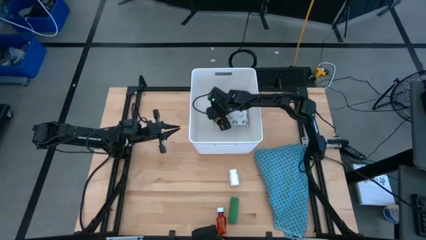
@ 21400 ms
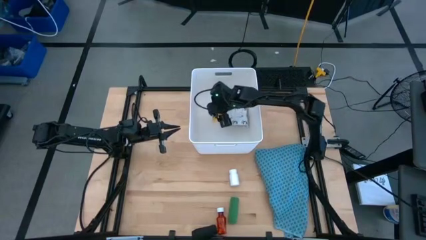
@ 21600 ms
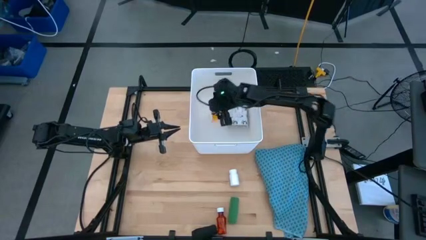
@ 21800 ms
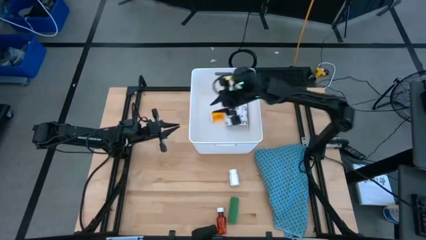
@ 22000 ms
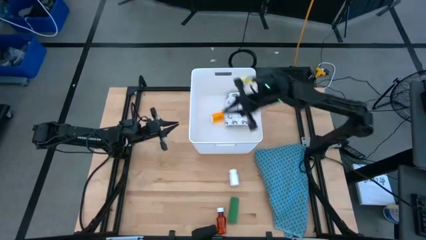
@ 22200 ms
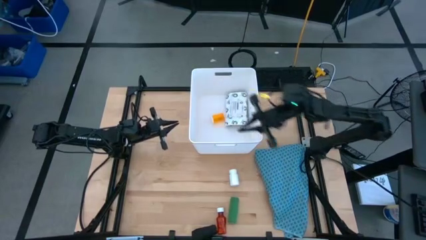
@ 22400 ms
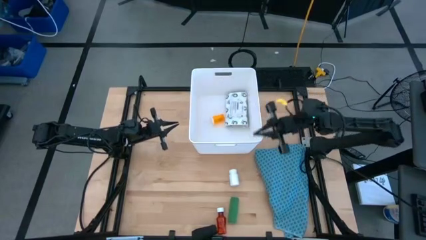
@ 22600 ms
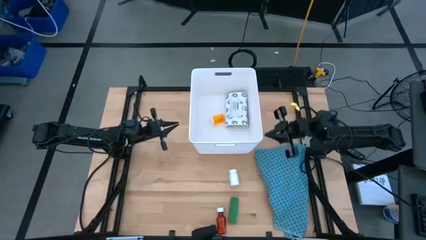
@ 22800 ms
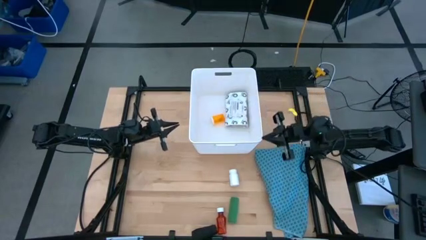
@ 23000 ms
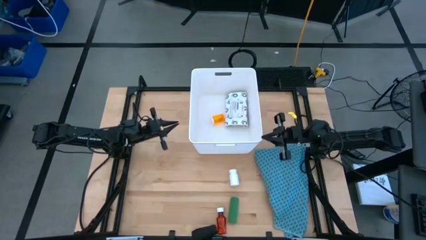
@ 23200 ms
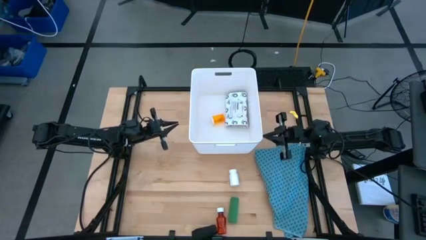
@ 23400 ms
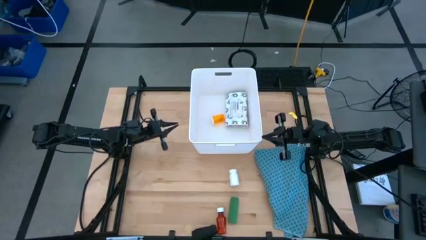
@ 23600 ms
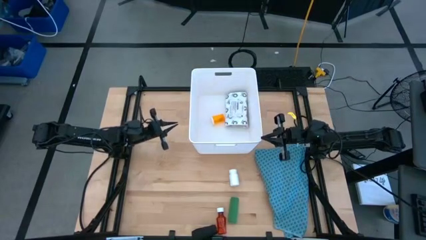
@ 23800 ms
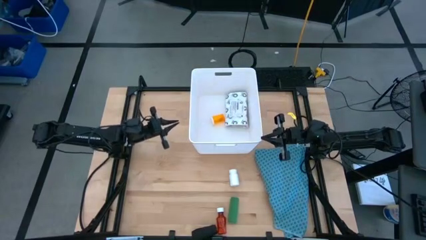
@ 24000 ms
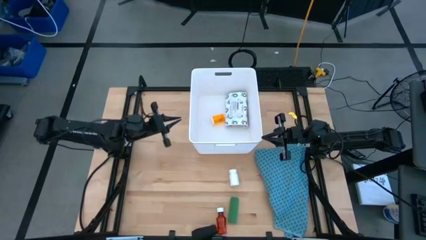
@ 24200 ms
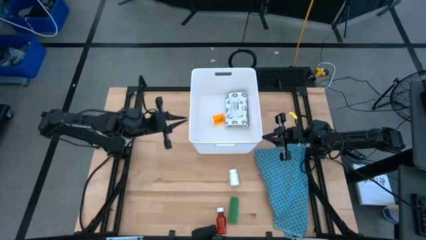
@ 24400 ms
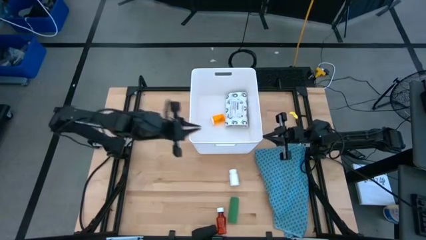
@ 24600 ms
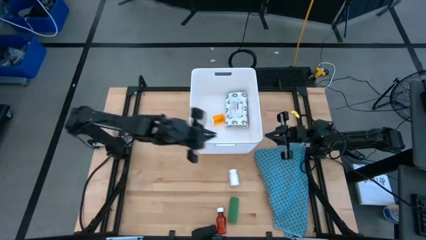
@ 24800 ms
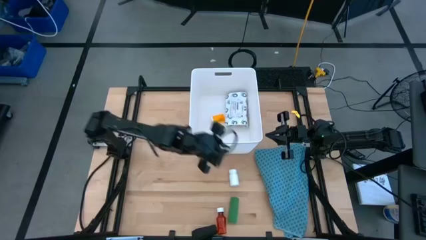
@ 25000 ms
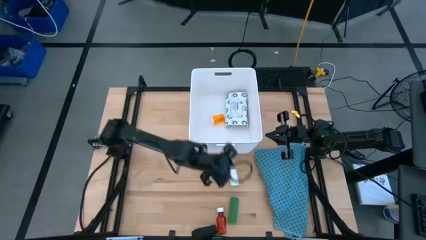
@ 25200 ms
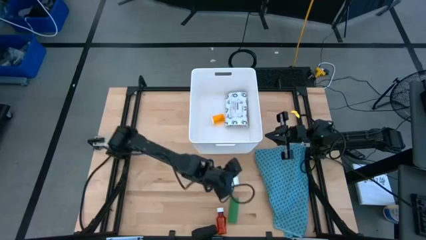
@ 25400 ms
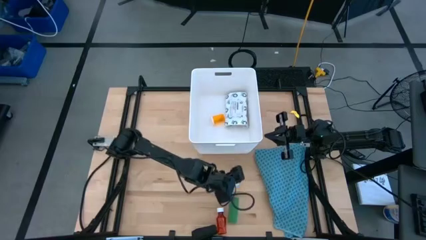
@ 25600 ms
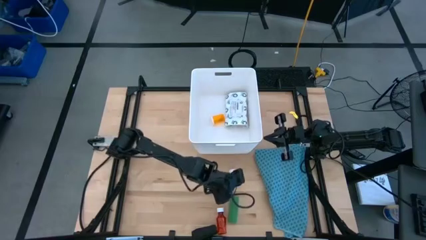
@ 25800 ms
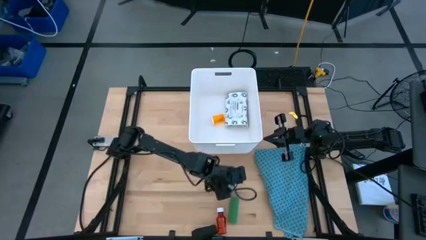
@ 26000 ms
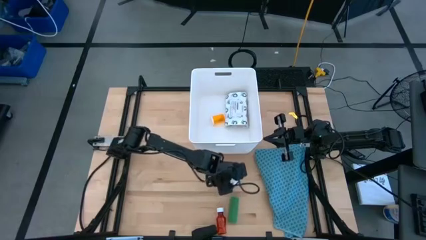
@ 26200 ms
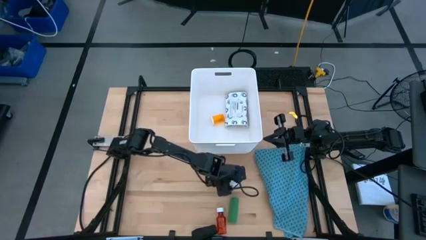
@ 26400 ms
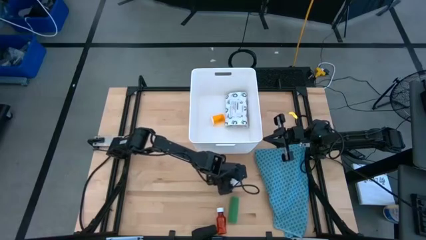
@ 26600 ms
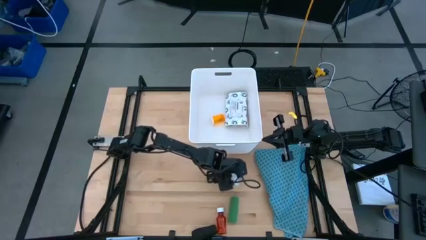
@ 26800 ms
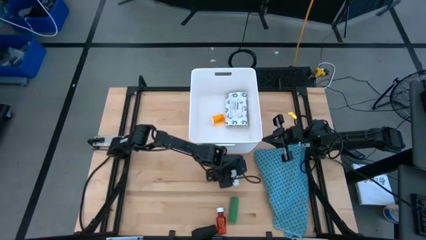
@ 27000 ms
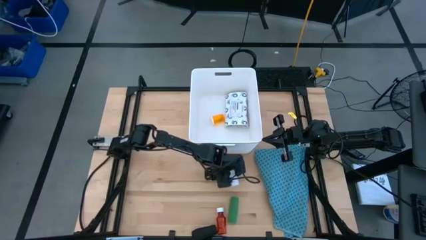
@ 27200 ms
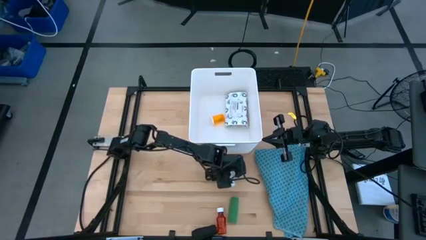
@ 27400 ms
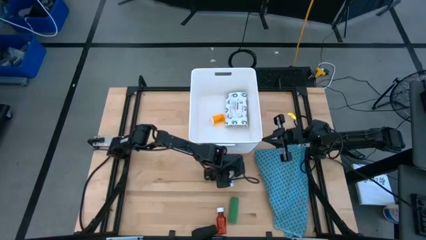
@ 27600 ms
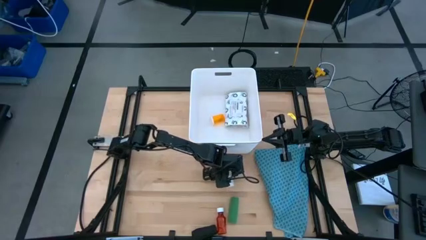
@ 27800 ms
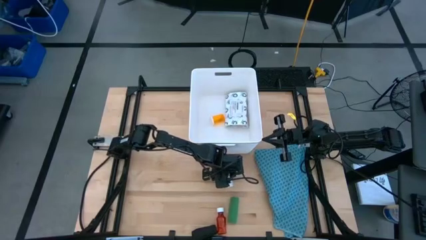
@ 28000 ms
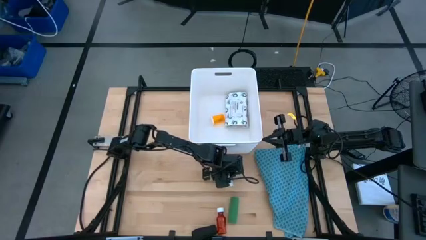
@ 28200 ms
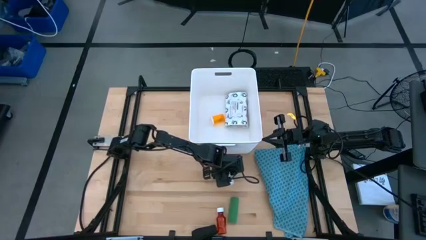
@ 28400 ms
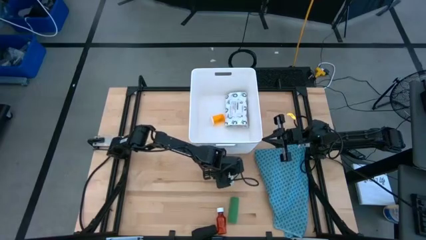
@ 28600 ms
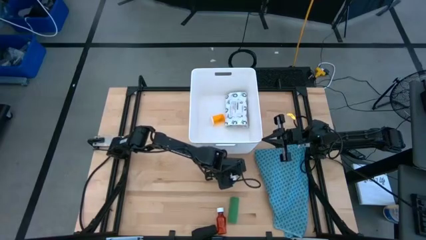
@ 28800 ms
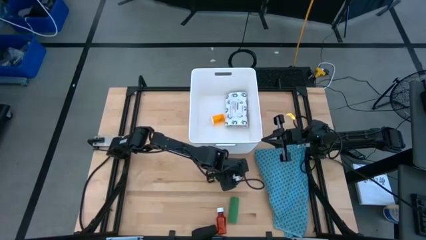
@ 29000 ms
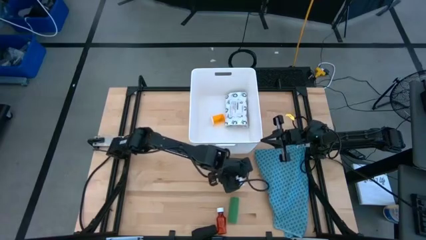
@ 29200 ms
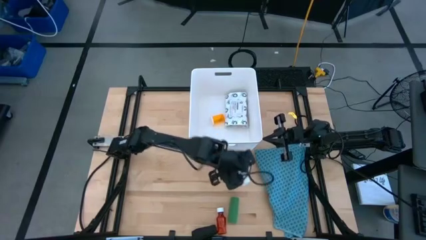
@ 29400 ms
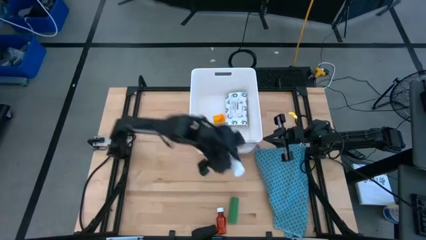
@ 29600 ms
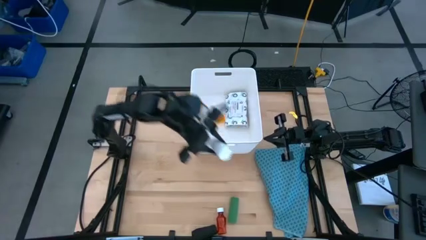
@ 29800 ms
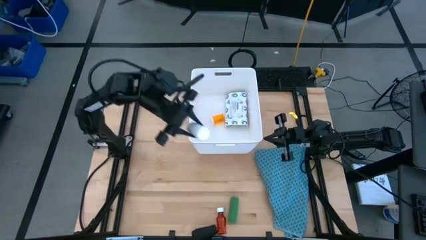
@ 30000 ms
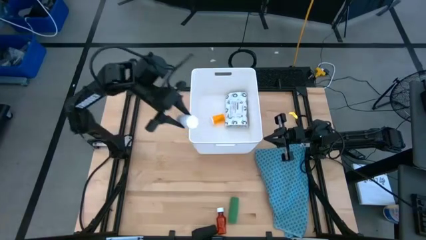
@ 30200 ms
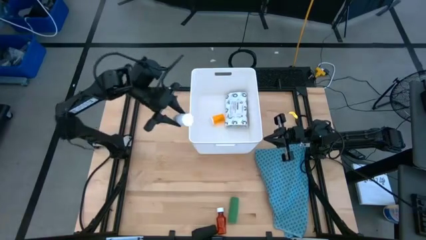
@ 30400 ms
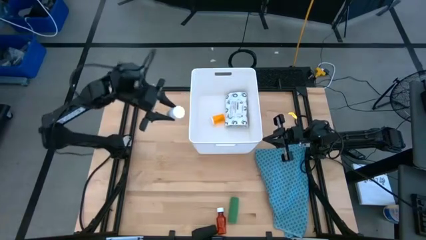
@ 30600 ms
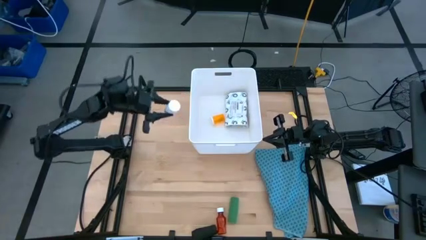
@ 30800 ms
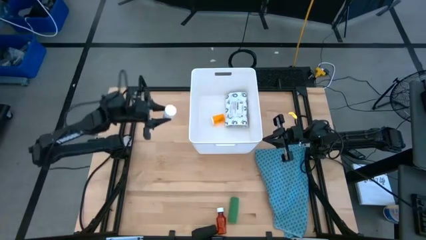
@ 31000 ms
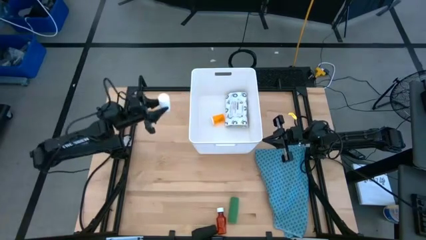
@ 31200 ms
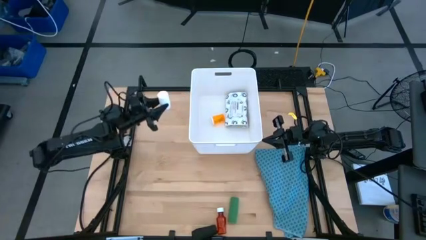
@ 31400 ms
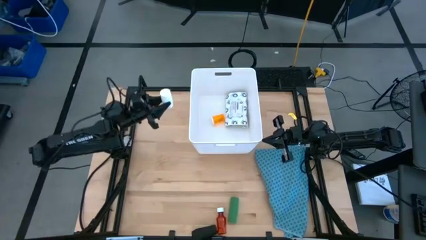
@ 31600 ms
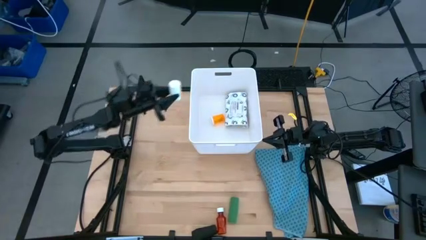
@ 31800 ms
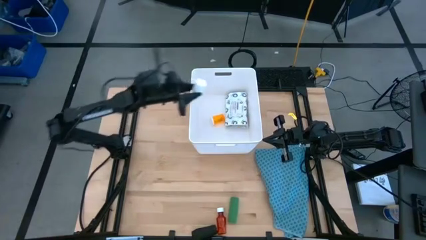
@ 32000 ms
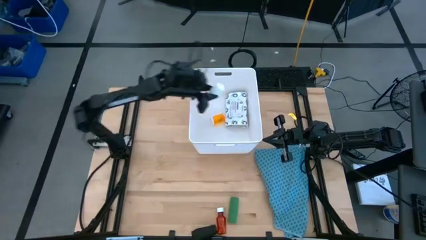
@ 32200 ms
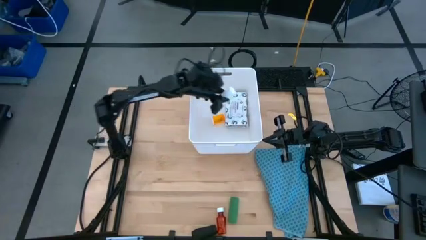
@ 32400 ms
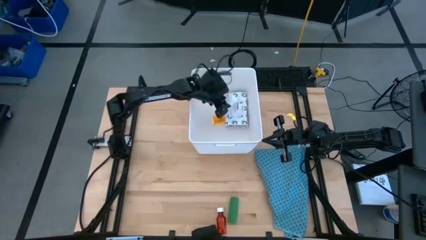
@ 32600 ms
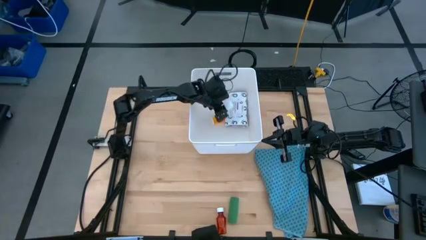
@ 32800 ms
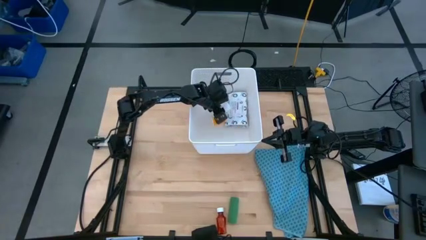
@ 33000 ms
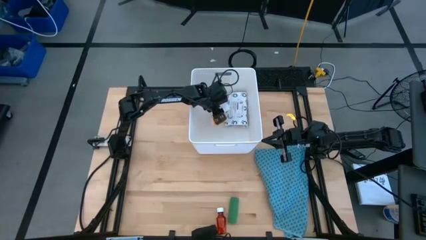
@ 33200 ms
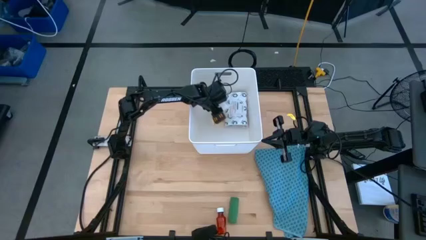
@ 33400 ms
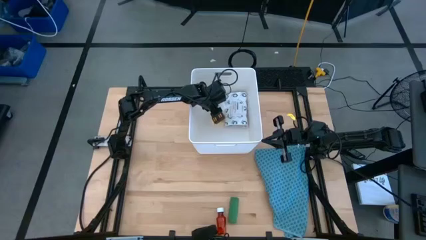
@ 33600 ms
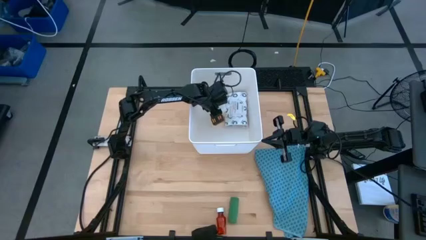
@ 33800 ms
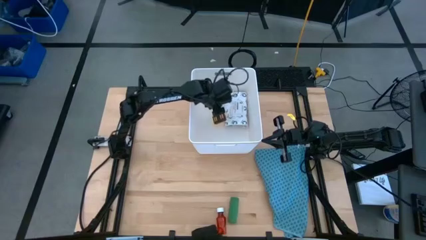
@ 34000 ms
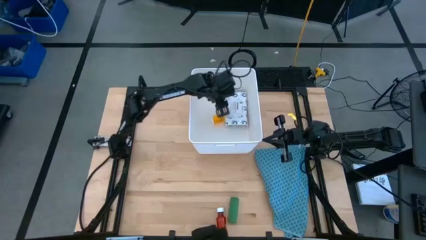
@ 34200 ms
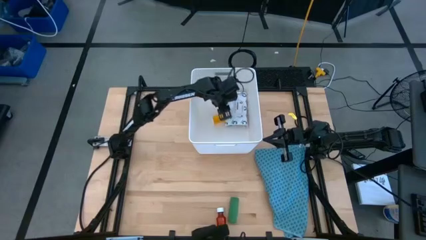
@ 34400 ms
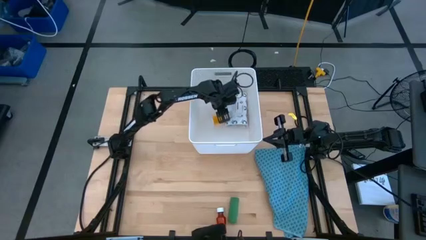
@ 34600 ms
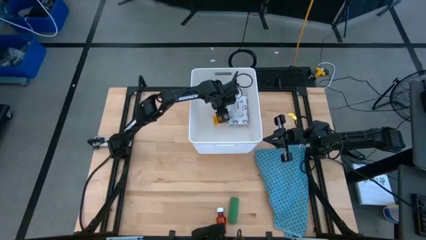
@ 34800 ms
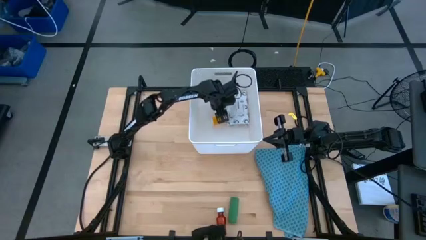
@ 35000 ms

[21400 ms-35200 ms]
Task: Pick & place medical supplies in basket/bin
Put the white pill bottle into the white bin
